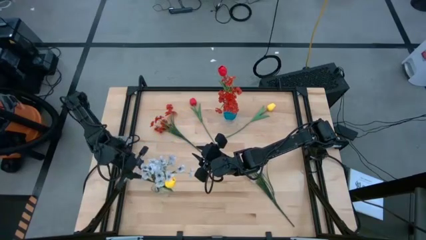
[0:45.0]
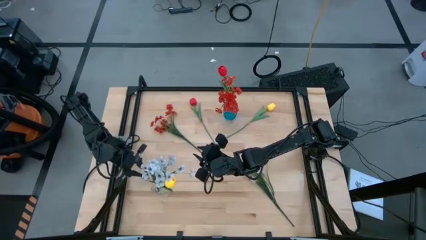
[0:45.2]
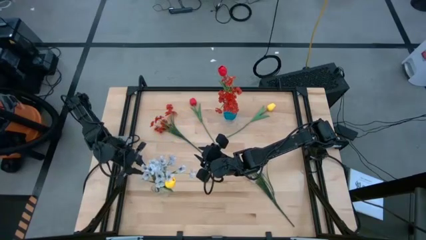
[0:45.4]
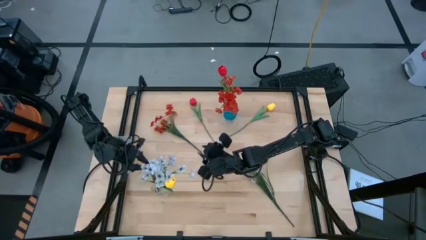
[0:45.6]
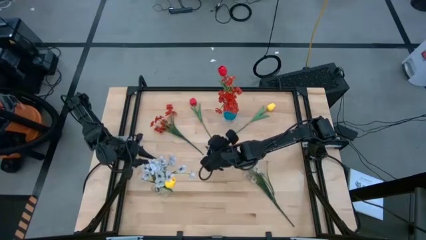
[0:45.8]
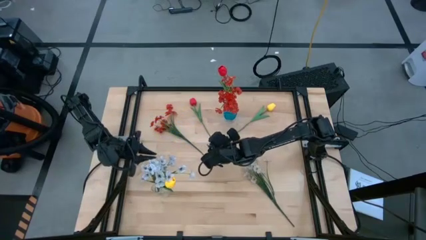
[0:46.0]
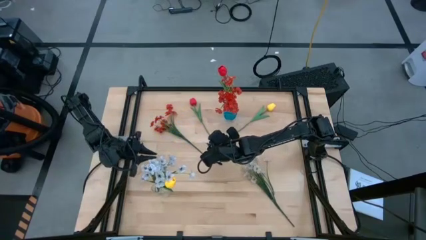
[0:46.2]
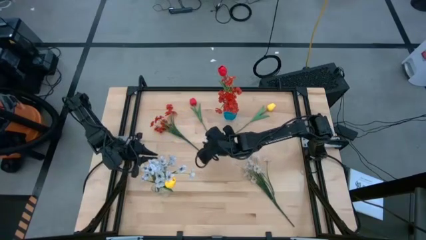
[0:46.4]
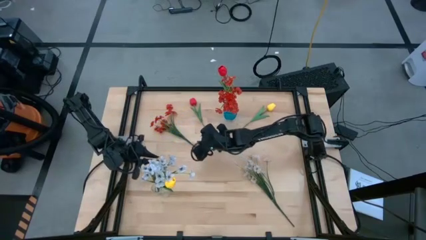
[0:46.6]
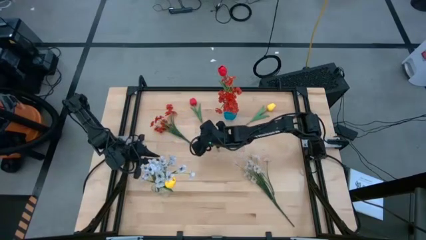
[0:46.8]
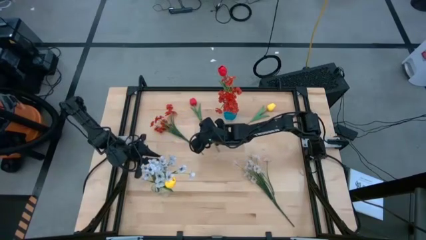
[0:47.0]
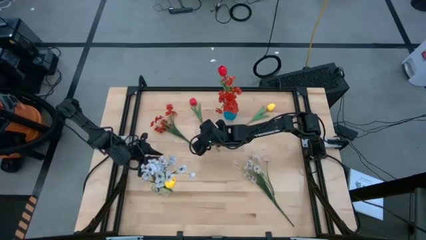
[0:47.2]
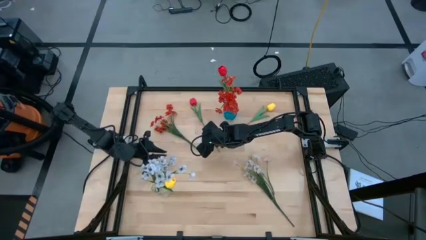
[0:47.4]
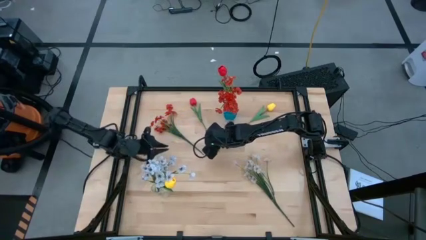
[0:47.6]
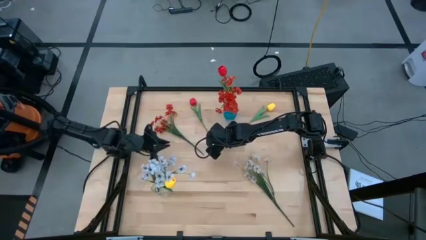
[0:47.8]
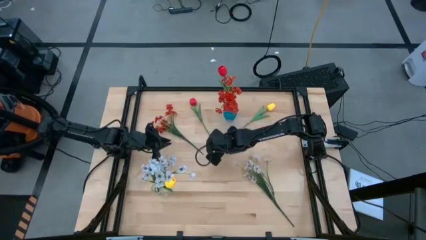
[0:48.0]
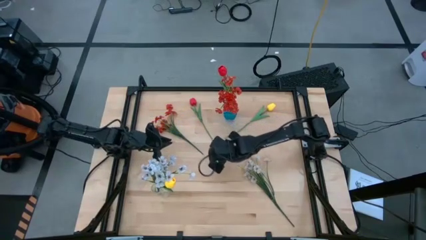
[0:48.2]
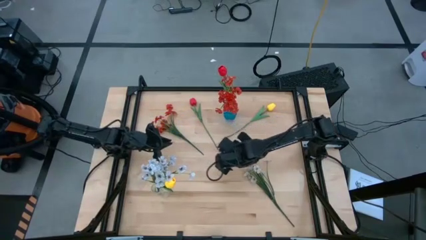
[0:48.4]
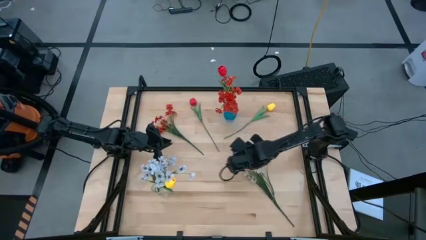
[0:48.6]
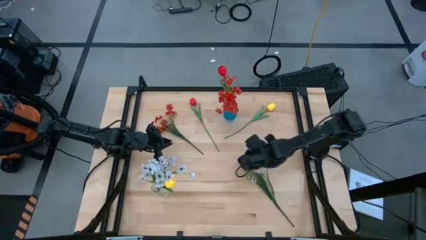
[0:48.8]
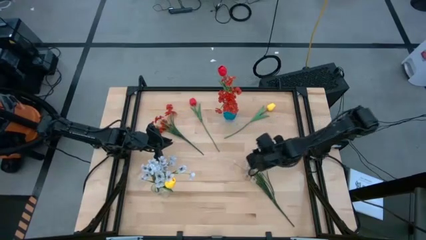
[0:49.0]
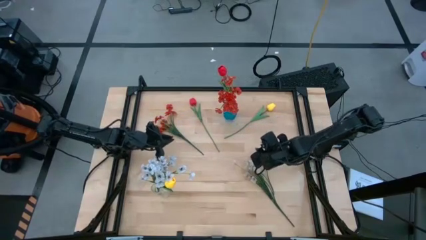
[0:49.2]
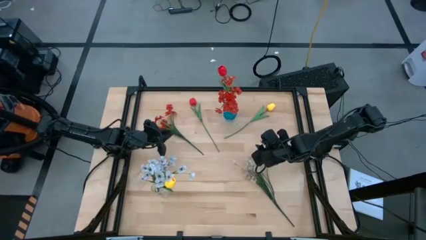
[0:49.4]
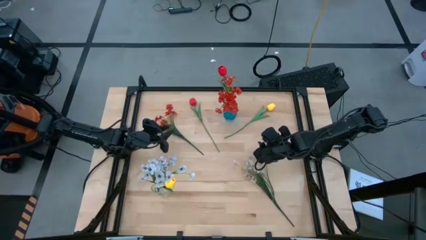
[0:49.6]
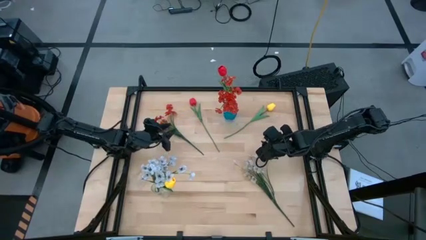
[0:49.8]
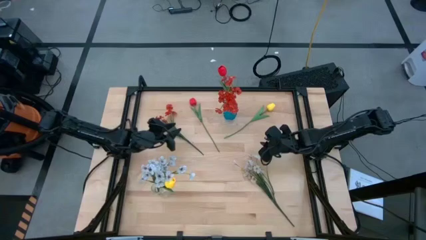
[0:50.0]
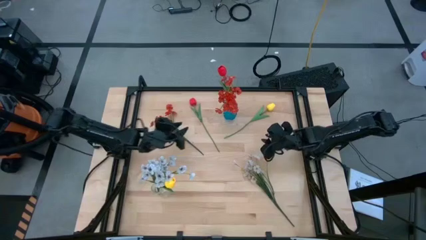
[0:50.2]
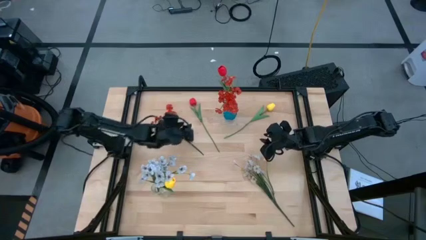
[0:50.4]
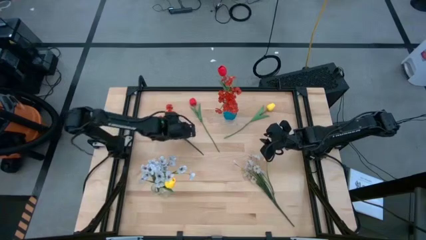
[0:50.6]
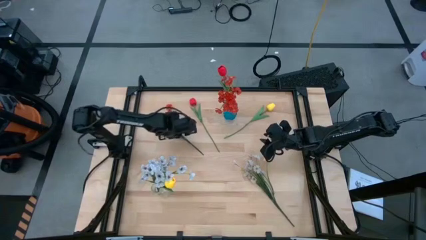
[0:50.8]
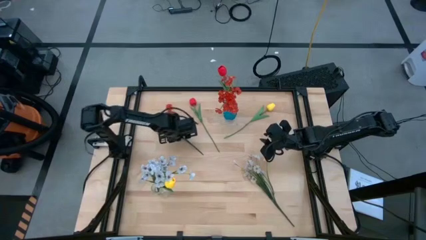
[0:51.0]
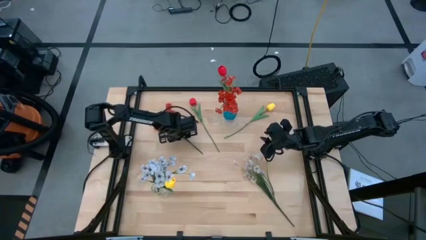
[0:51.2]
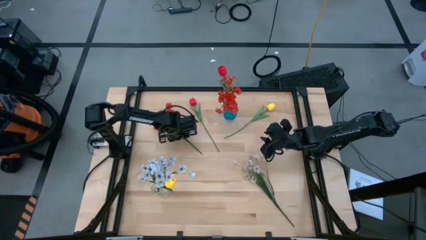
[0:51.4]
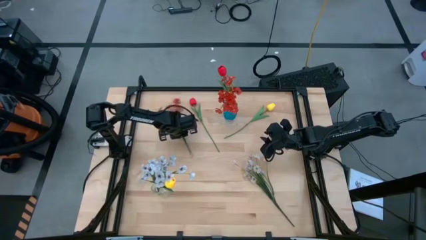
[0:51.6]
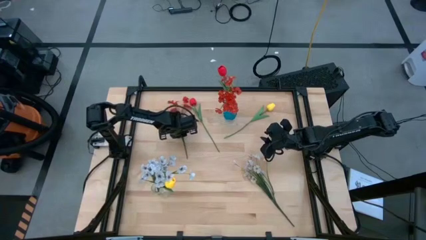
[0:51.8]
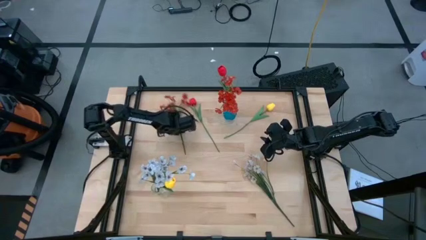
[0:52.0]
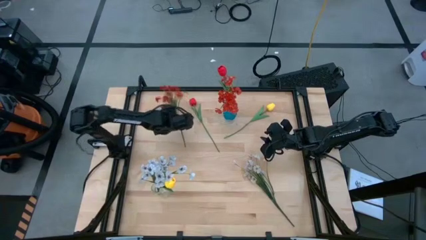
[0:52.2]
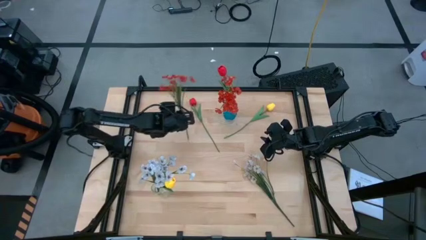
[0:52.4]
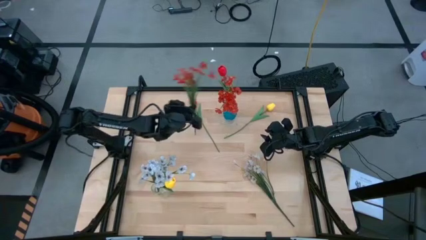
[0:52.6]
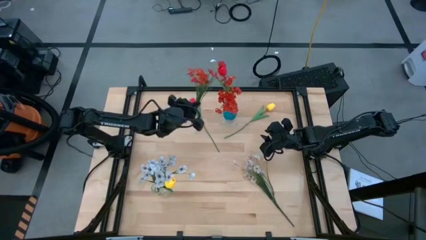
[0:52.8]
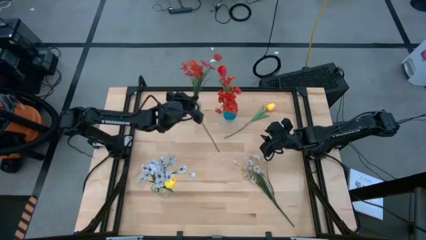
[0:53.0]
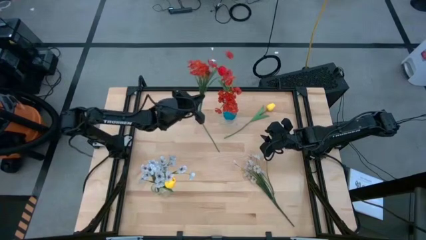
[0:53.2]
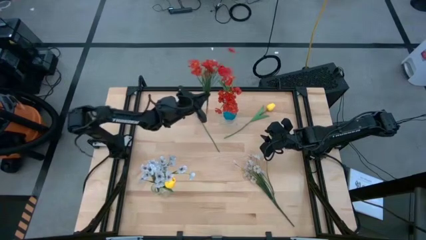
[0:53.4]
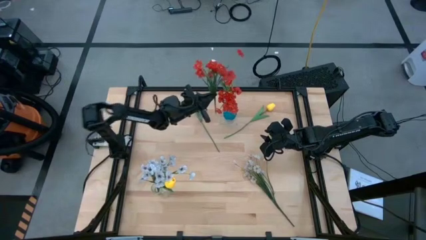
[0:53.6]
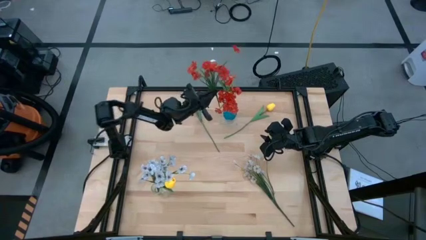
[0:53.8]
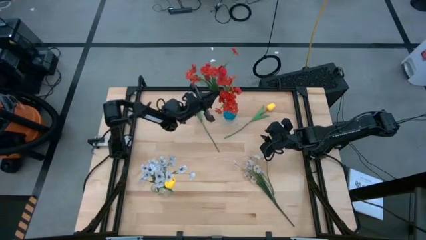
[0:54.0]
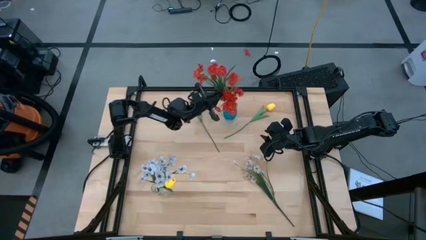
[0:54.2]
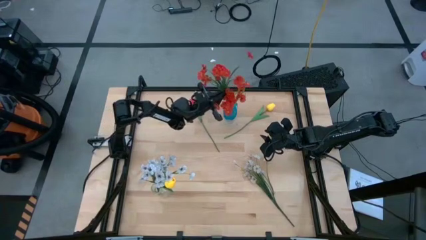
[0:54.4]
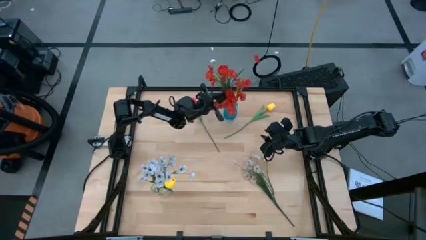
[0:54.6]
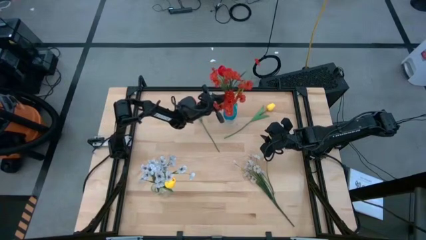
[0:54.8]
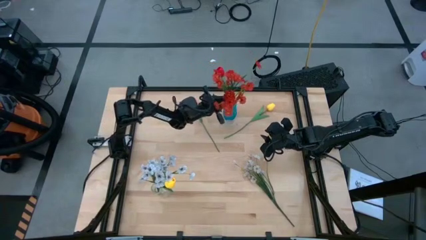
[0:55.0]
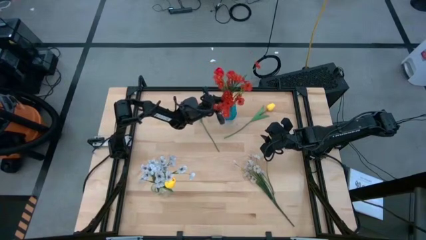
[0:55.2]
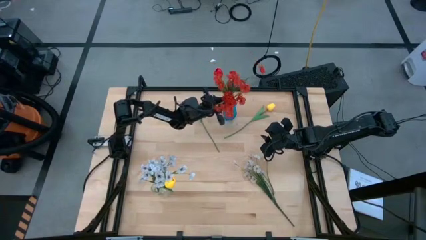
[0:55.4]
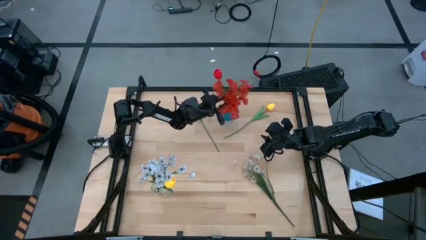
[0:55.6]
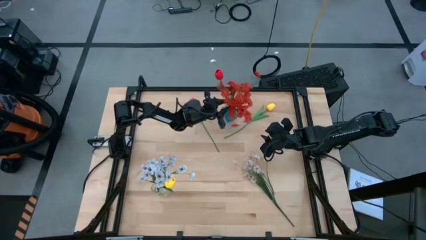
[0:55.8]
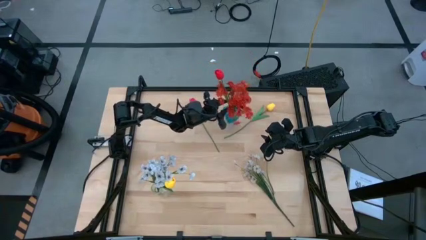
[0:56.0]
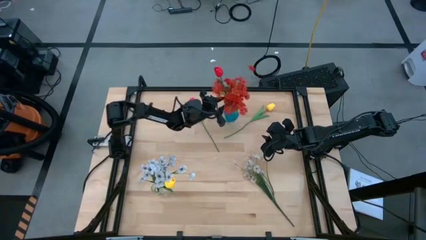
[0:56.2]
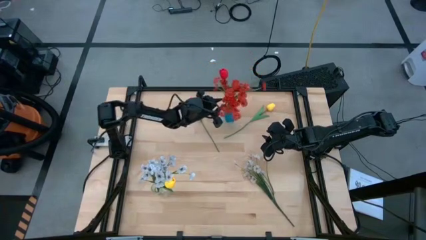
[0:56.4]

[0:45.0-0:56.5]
Task: Sort flowers into vase by color
Put the orange flowers into the blue vase

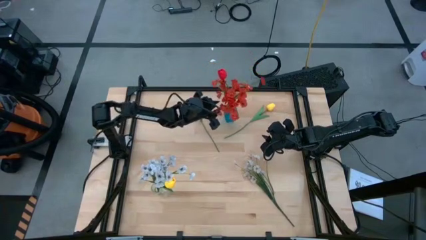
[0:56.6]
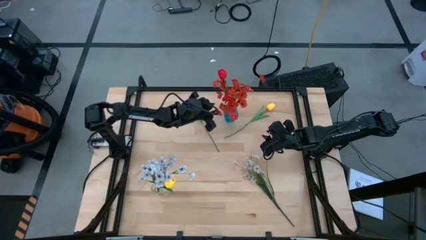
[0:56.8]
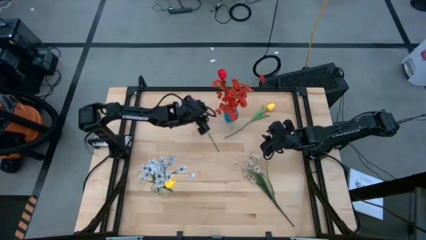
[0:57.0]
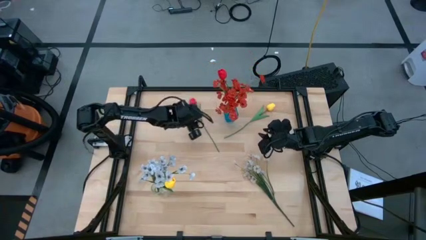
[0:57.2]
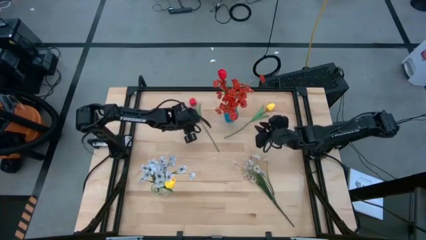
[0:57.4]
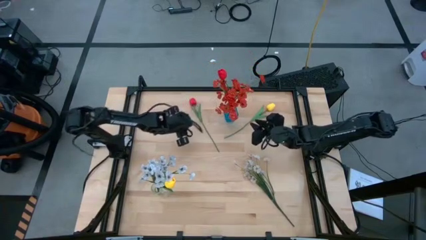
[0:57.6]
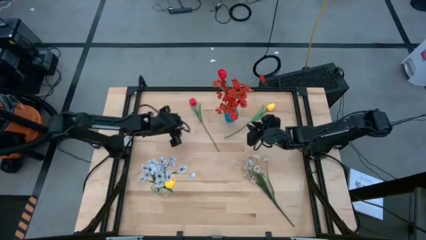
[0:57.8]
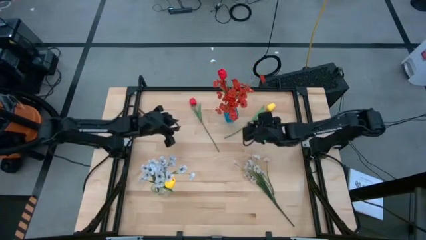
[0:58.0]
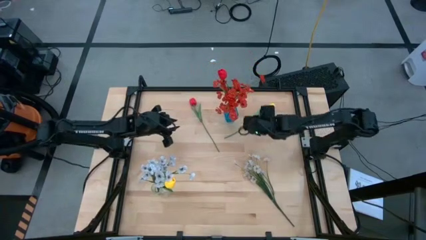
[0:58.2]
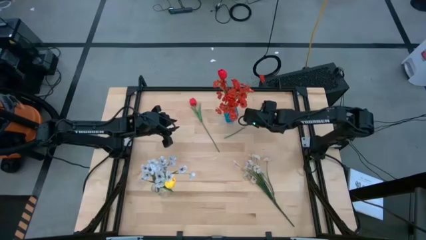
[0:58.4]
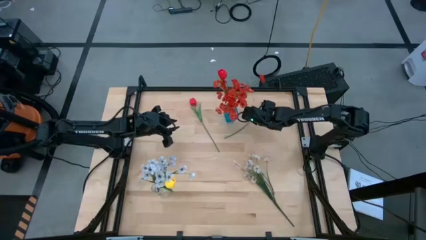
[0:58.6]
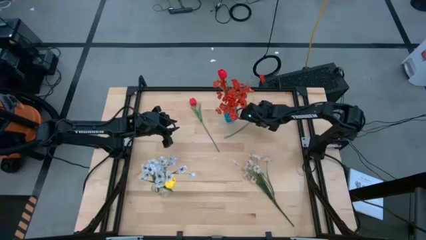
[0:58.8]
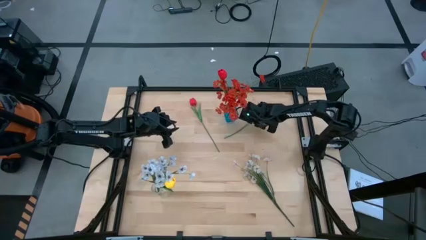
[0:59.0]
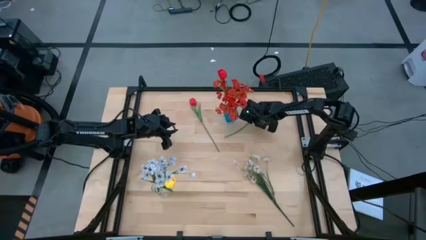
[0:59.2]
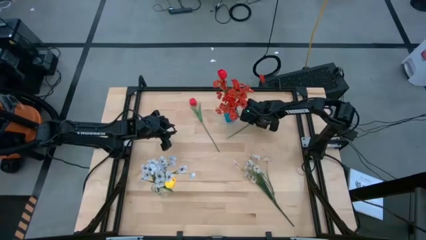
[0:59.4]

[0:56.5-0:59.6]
Put the yellow flower into the transparent vase

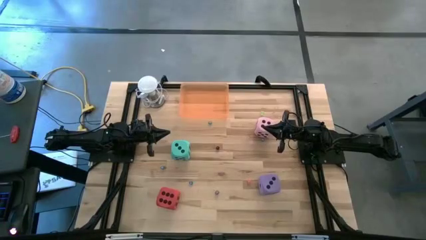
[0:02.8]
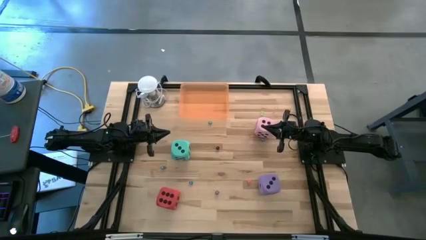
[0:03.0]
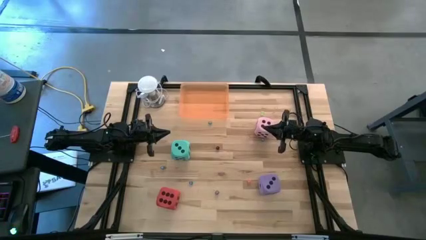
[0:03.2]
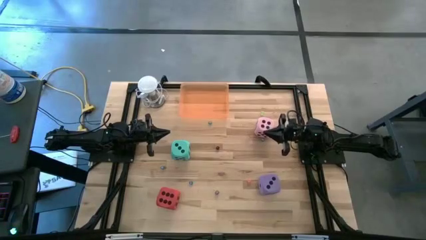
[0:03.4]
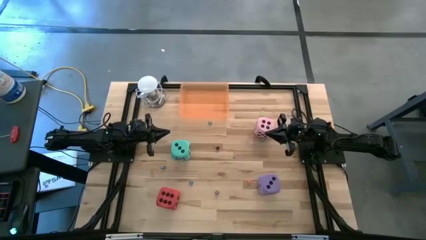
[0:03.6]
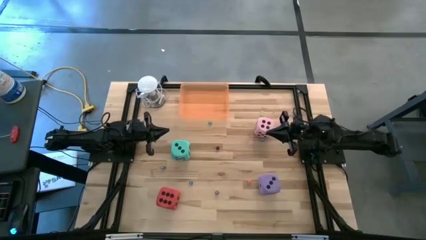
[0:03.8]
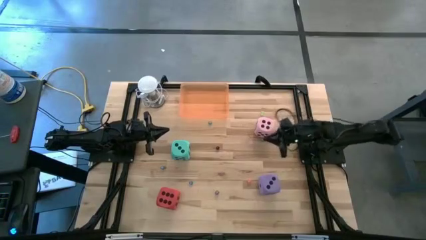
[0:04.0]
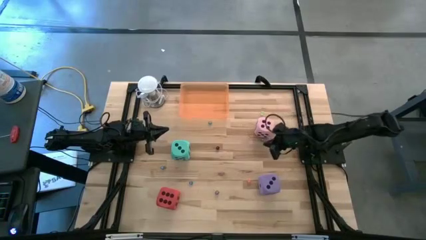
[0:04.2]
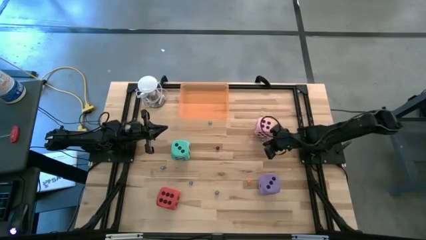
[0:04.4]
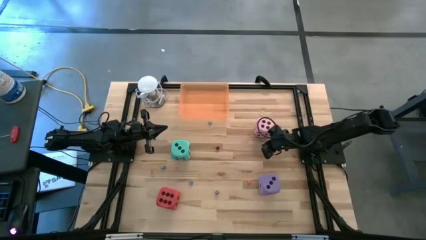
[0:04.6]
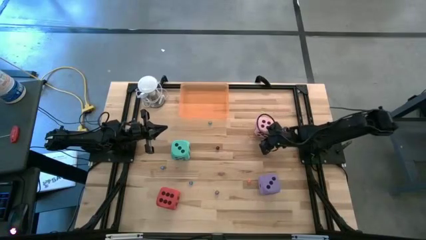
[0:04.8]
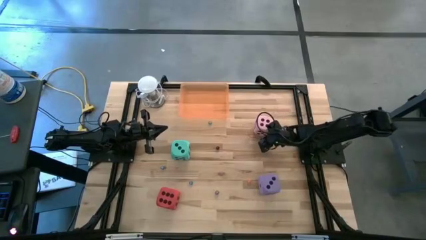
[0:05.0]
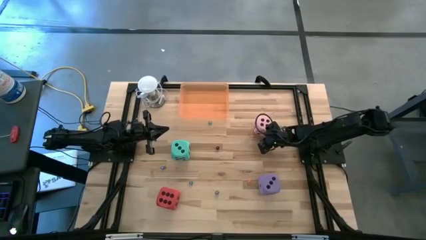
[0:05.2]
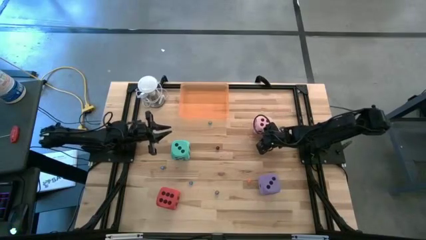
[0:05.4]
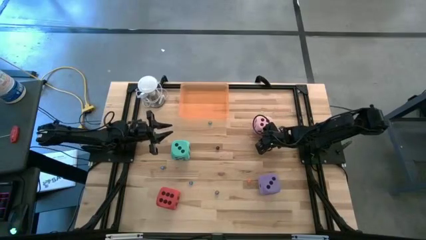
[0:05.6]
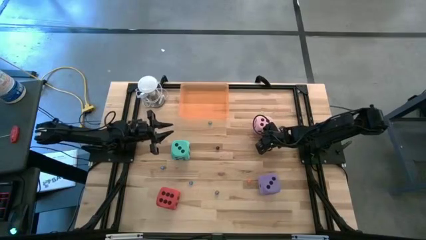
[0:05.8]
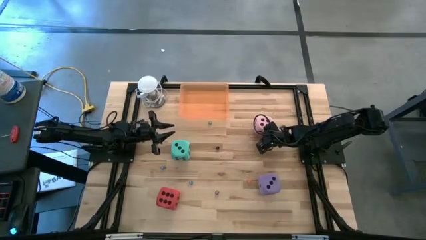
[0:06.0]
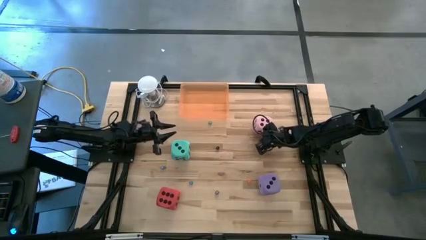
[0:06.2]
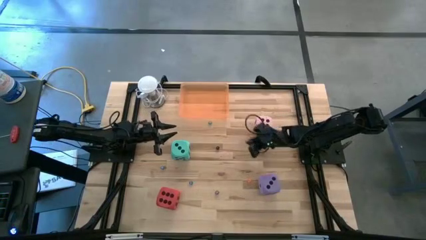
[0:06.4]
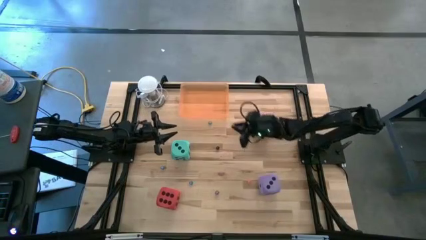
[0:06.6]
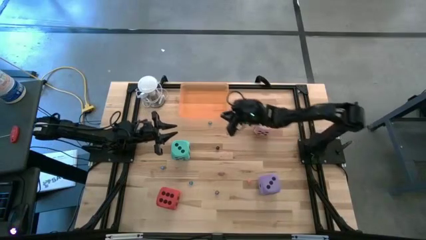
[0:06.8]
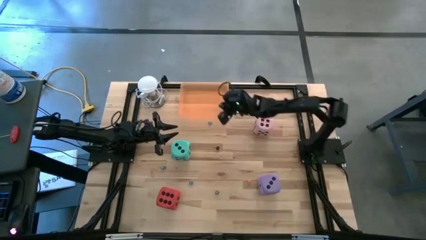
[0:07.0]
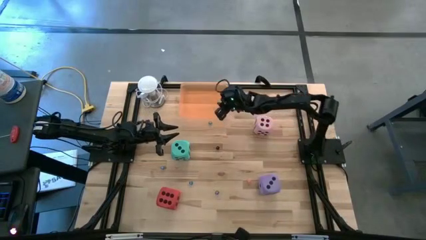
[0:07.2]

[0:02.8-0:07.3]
Task: Pick & Place Dice
Put the small blue die into the bin
